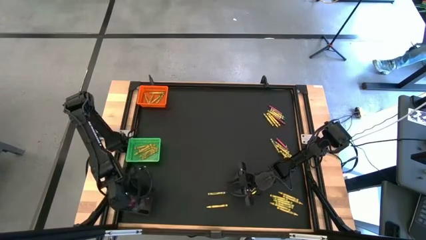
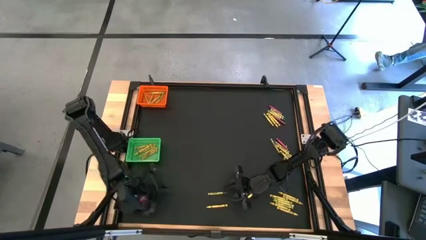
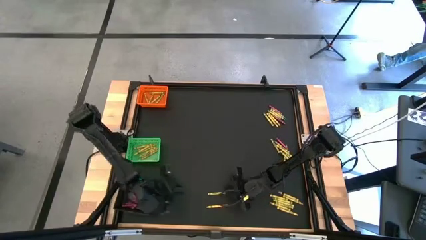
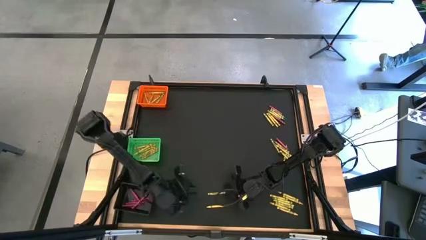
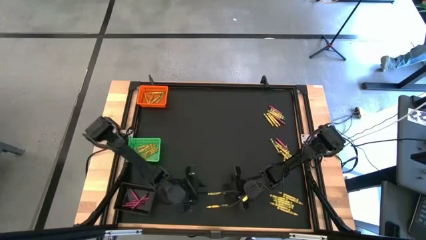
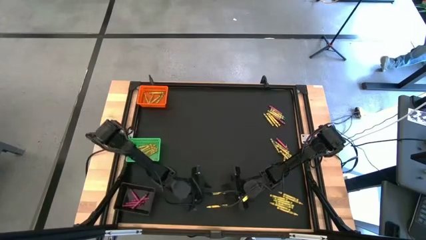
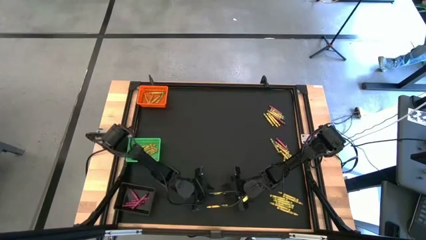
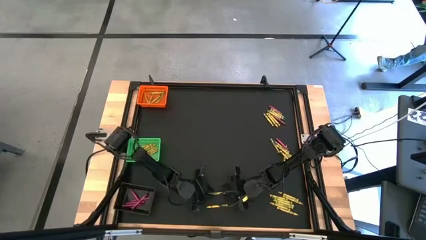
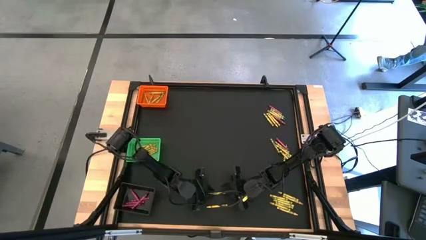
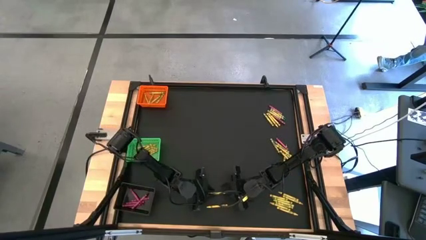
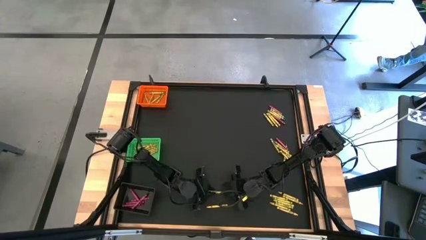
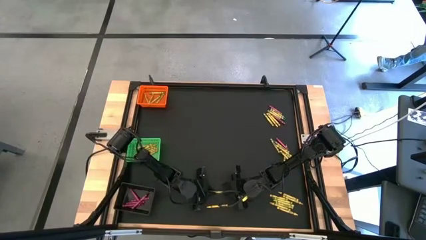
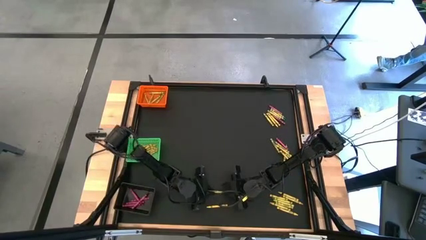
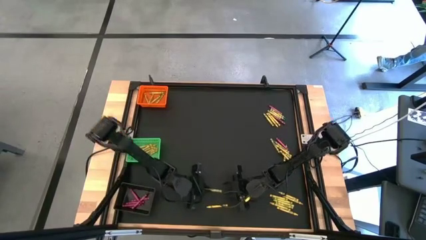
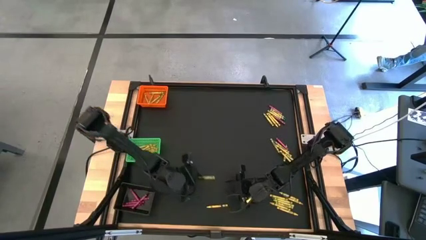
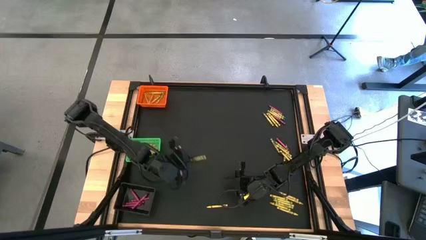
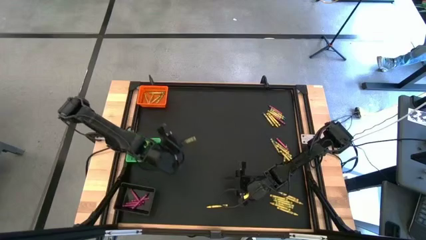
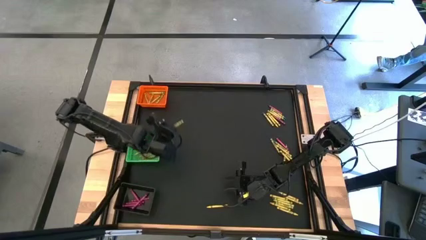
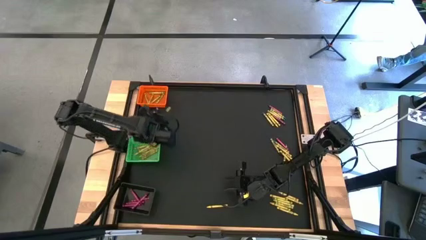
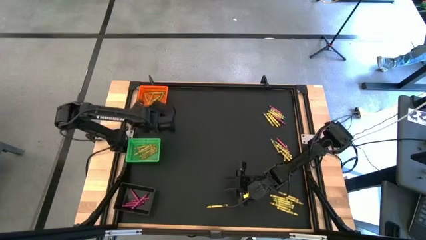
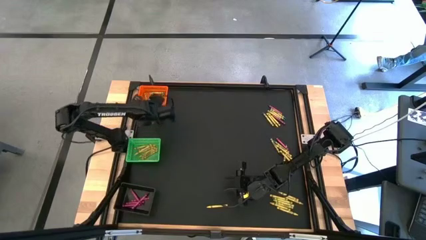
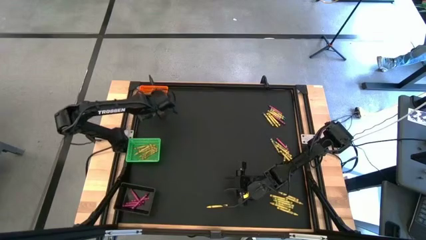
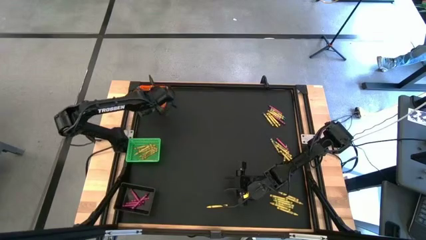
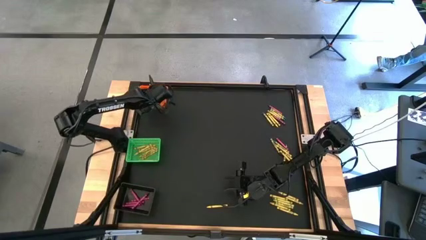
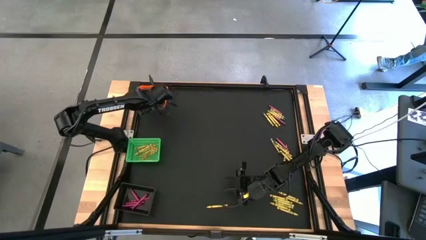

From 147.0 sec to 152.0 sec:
Task: Sort crayons
Put the green crayon into the orange bin

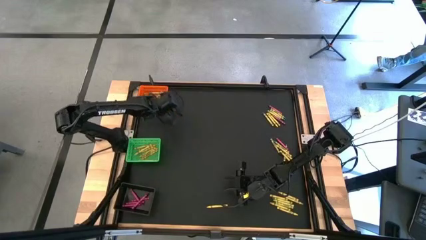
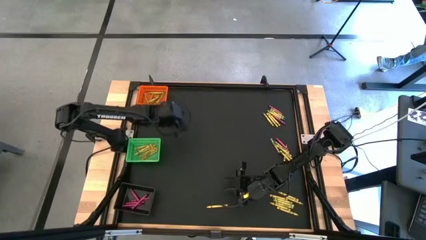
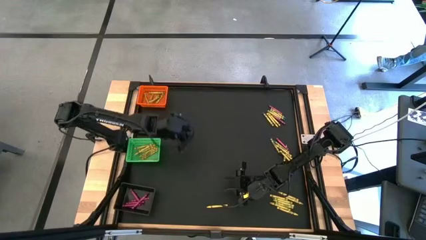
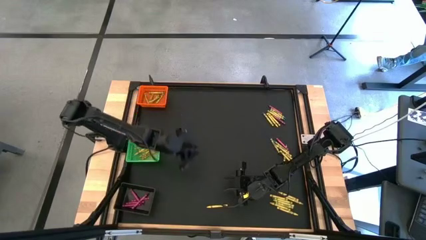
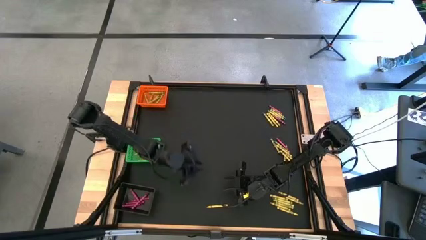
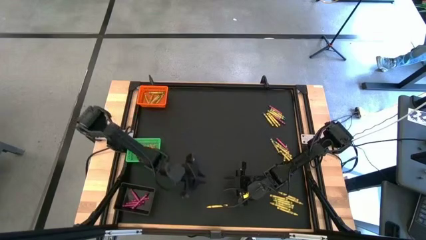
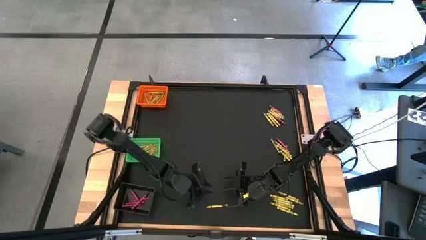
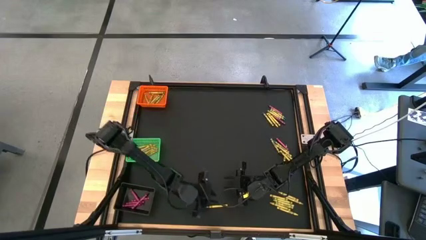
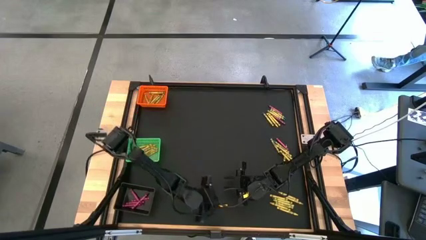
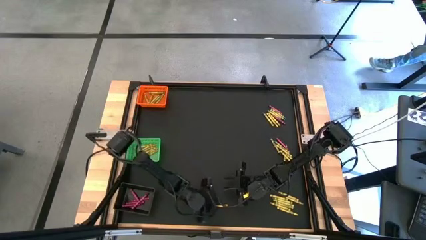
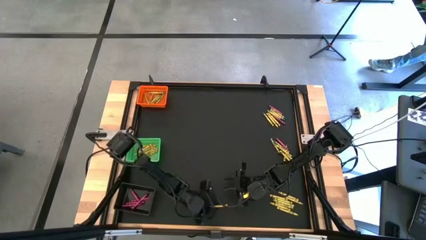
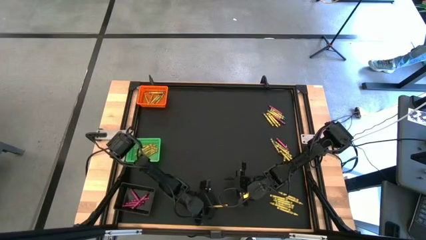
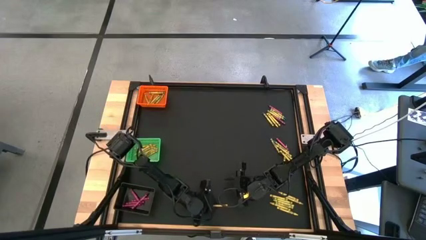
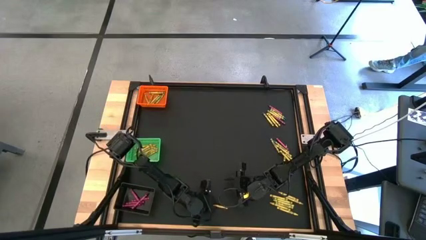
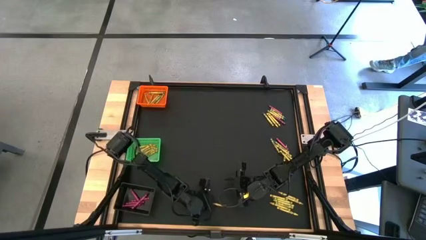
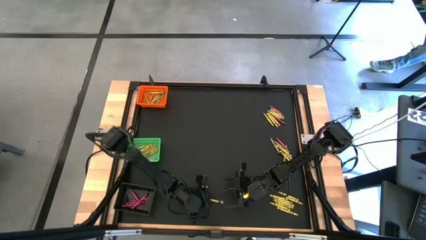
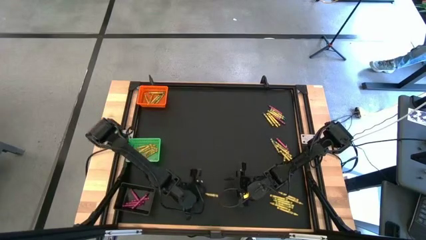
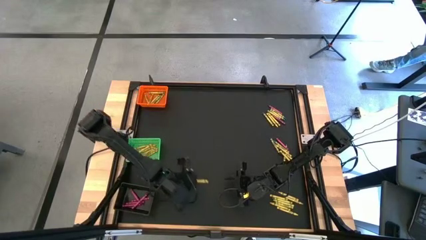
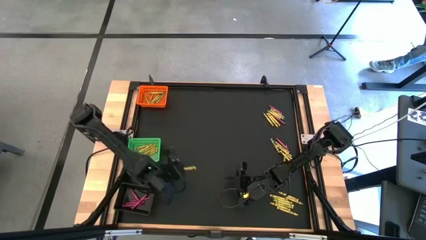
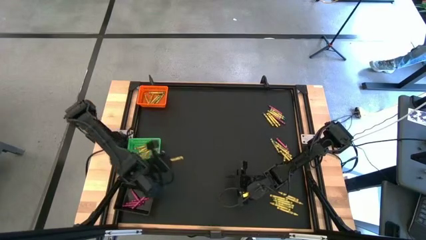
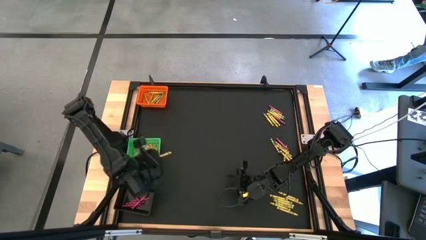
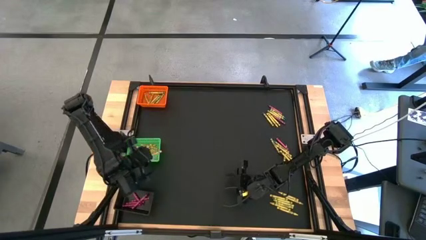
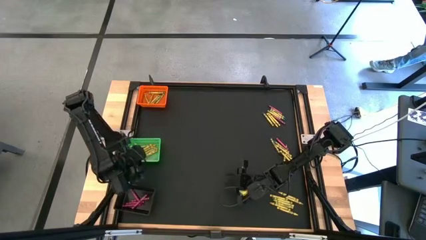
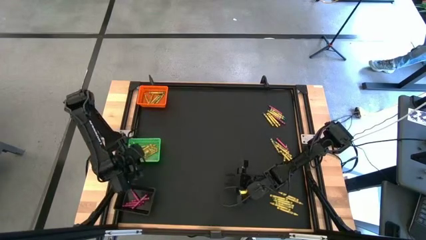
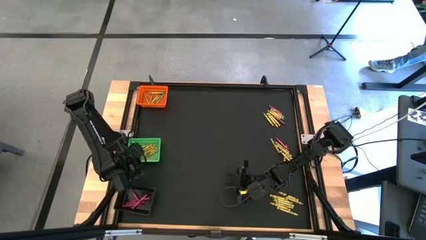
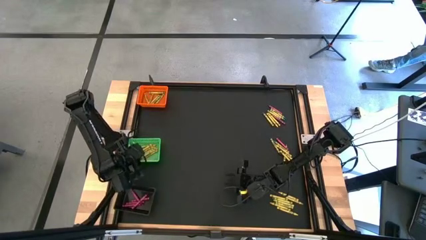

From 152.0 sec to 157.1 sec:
Put the yellow crayon into the green bin

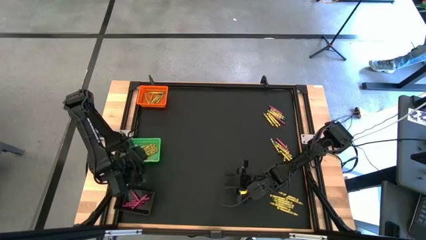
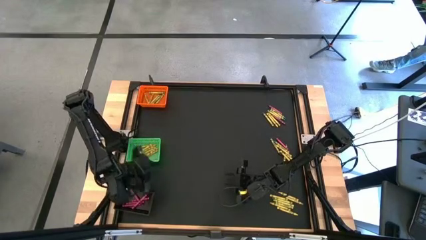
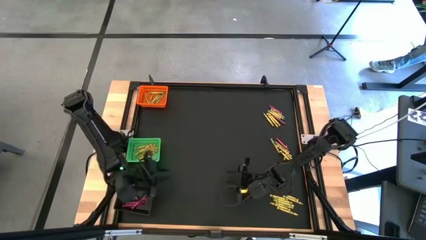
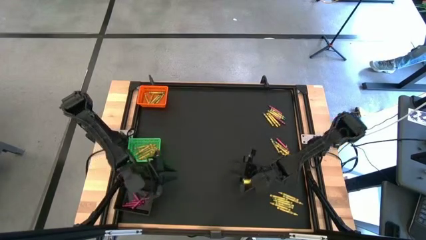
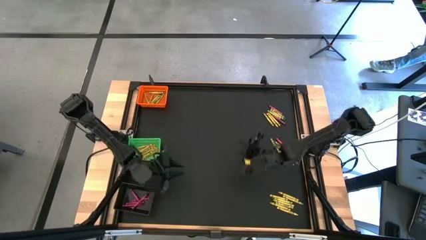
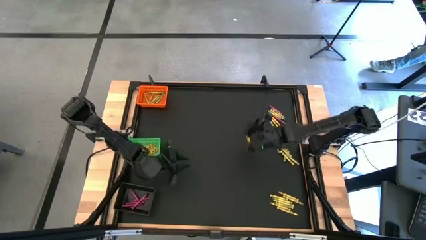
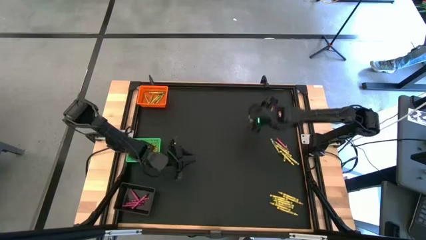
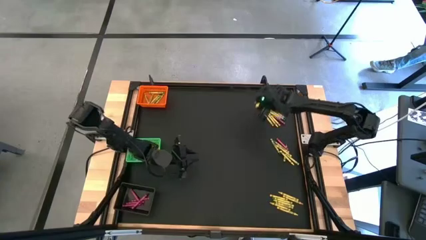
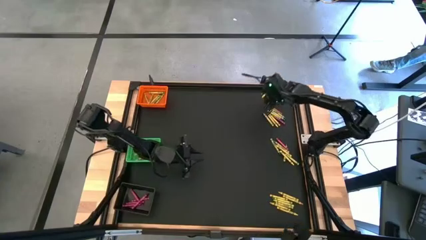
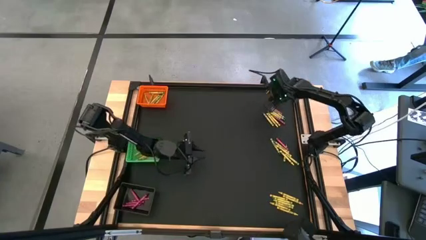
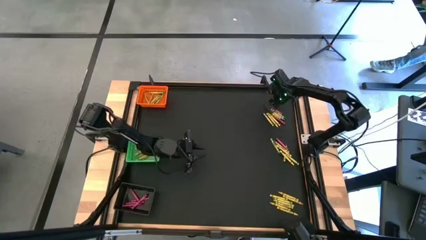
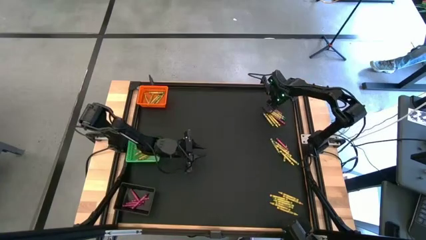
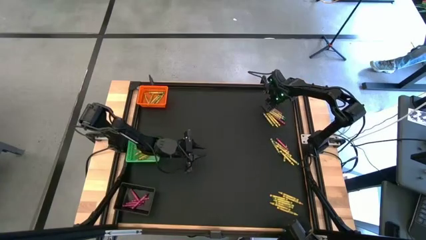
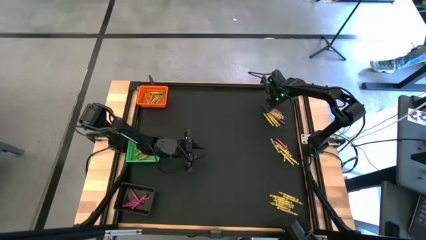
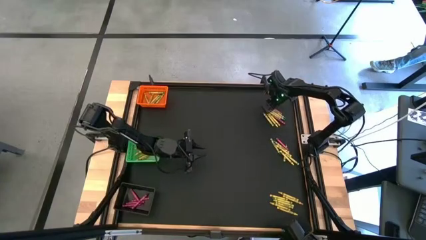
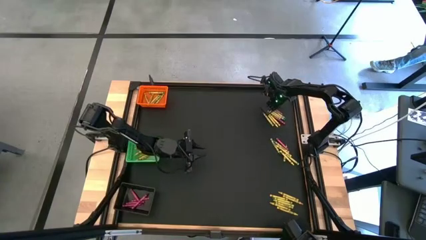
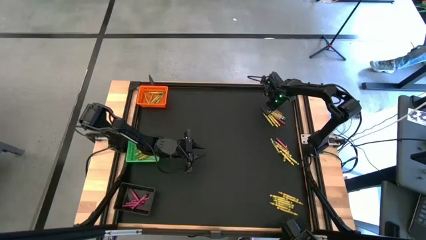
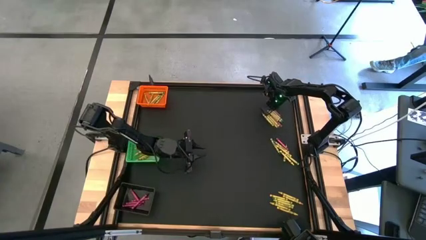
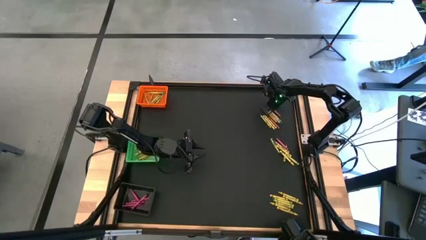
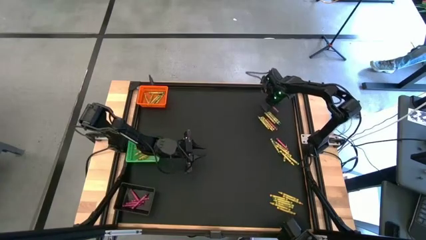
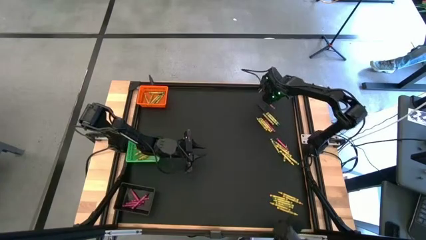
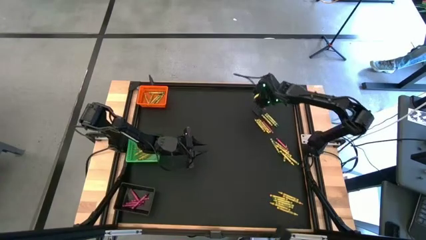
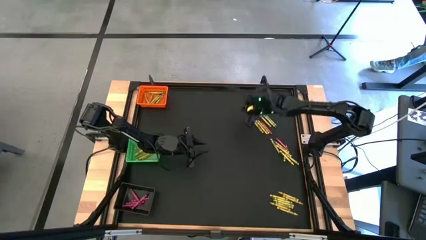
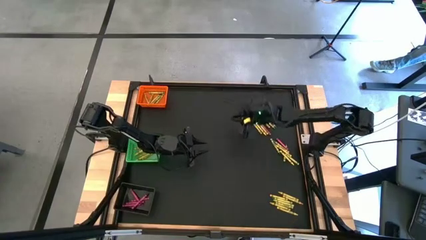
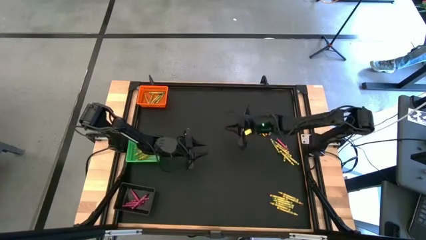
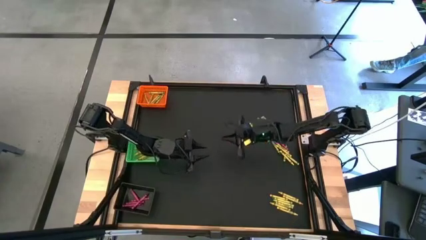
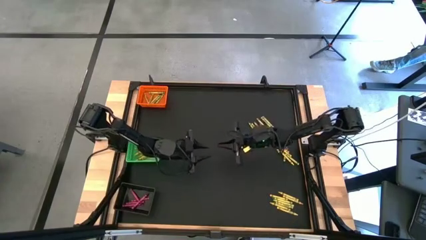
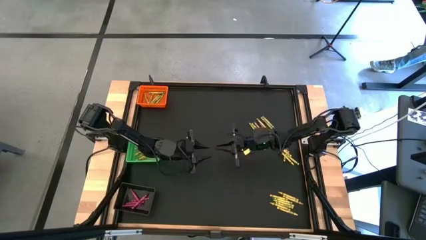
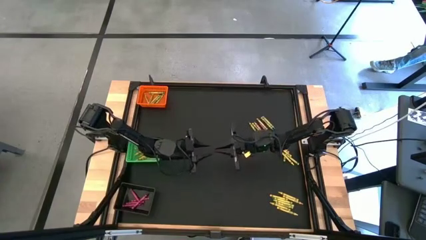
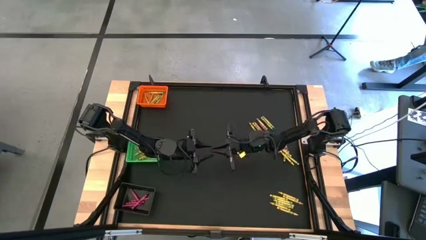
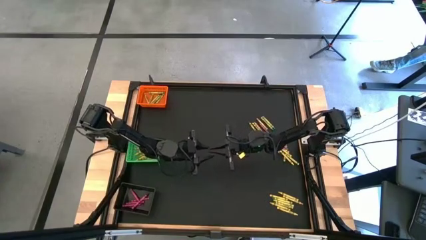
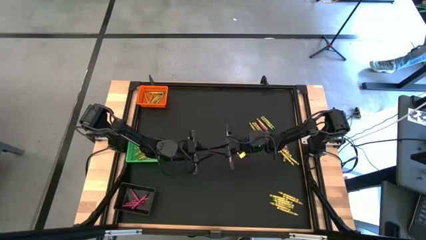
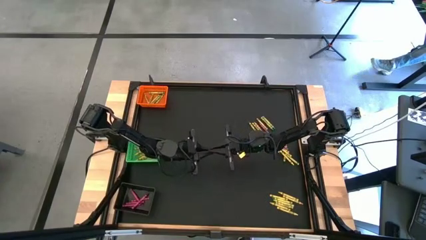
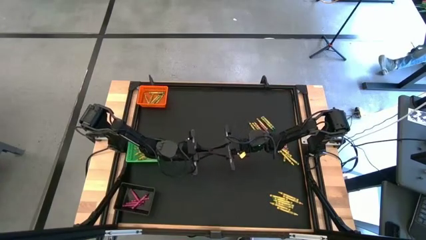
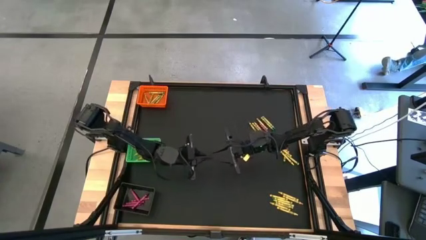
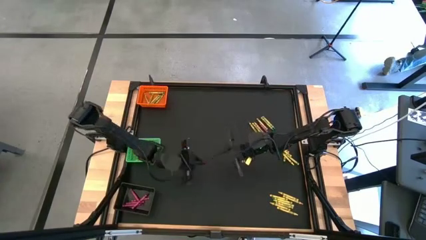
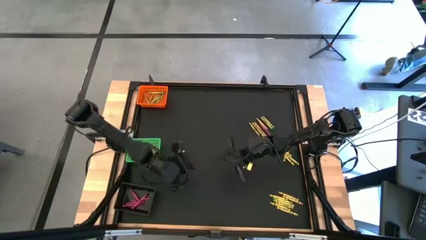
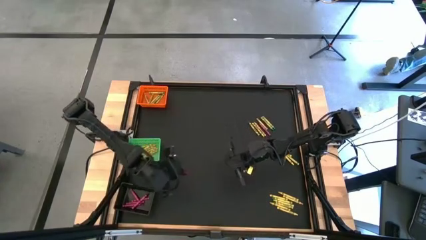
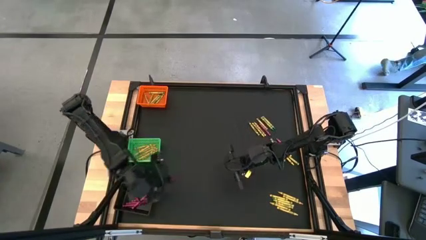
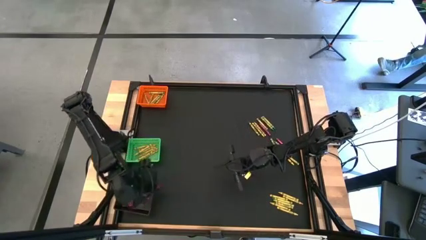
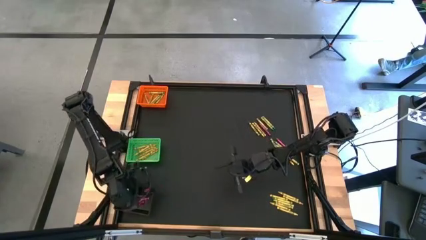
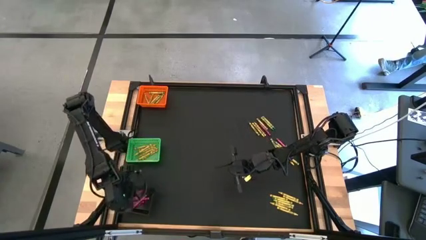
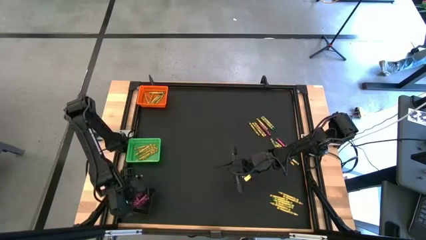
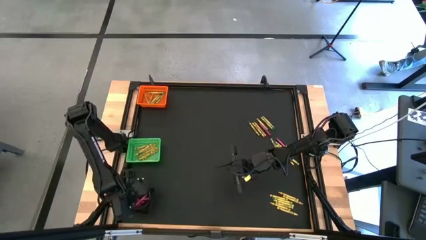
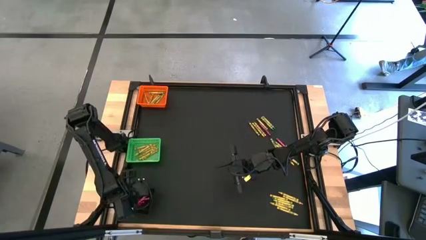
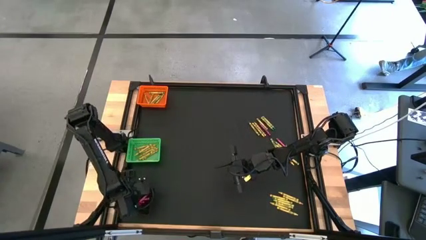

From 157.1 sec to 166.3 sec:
Put the pink crayon into the black bin
